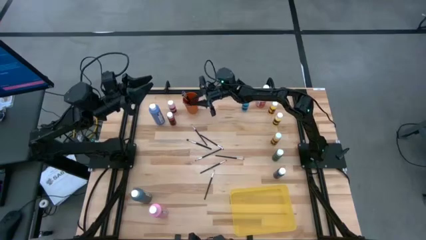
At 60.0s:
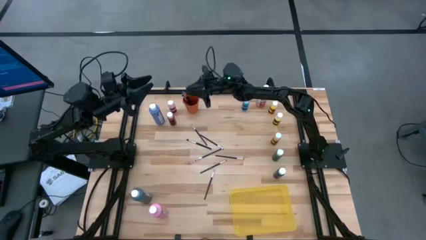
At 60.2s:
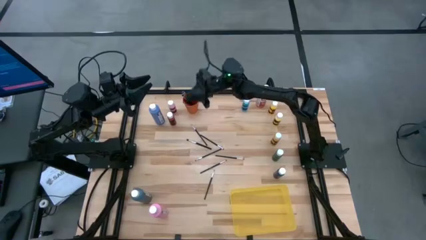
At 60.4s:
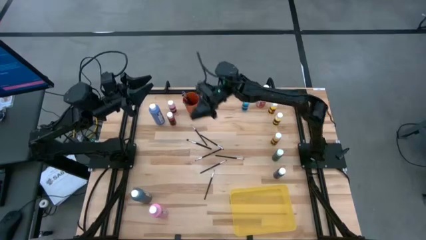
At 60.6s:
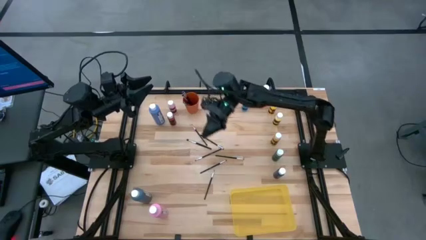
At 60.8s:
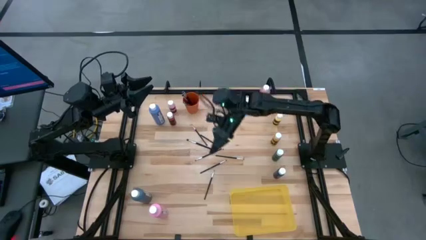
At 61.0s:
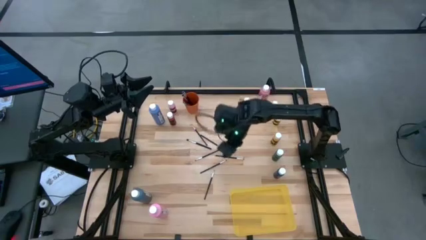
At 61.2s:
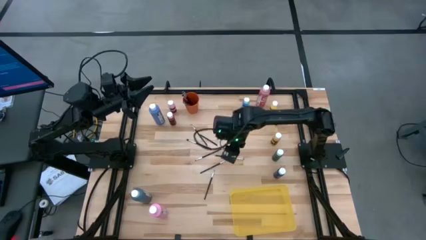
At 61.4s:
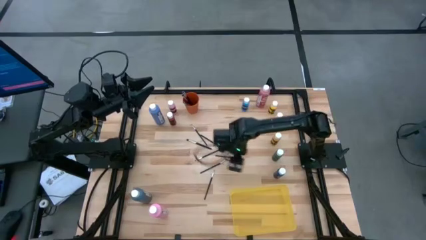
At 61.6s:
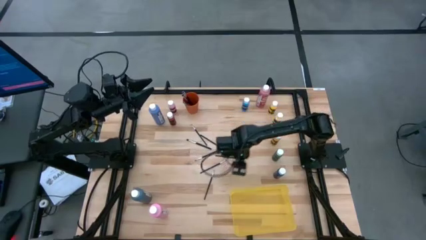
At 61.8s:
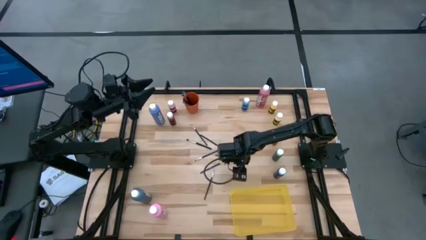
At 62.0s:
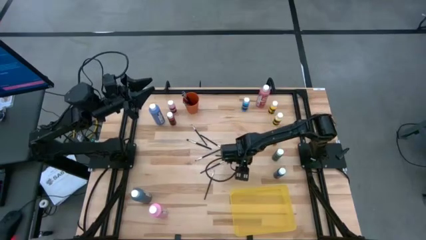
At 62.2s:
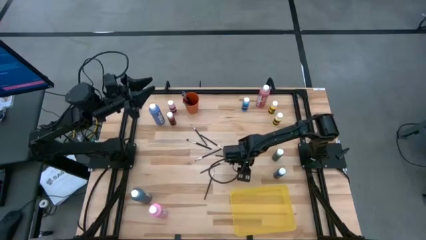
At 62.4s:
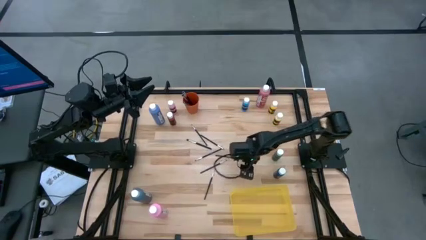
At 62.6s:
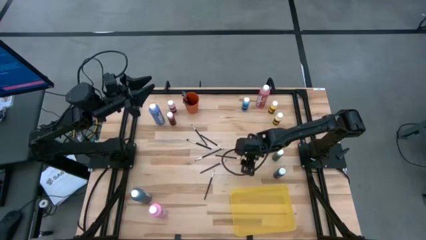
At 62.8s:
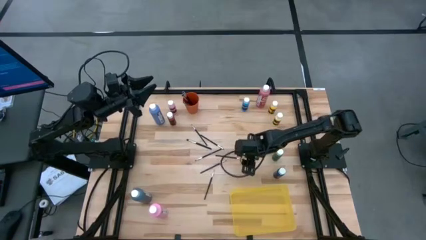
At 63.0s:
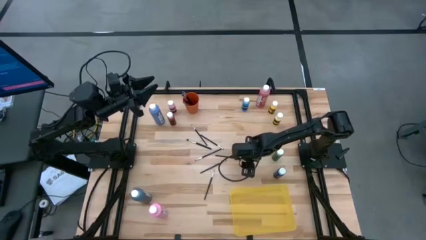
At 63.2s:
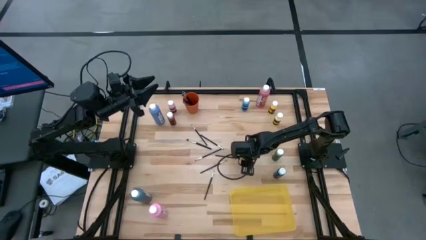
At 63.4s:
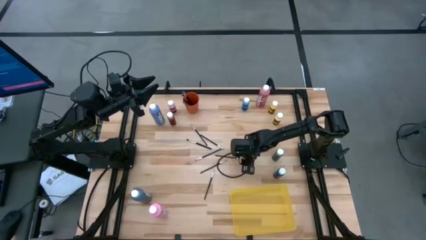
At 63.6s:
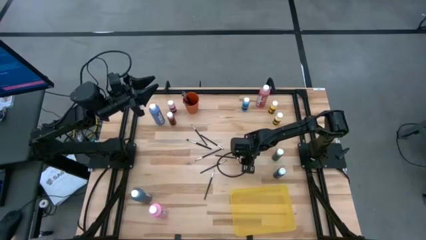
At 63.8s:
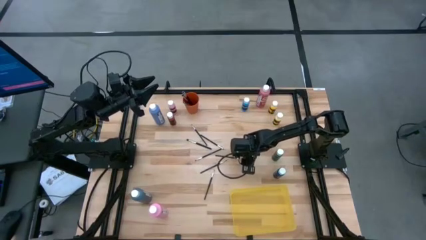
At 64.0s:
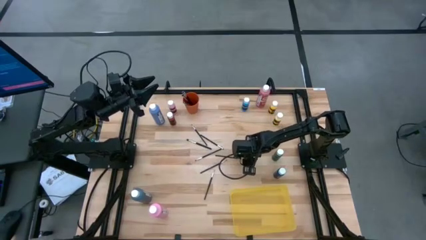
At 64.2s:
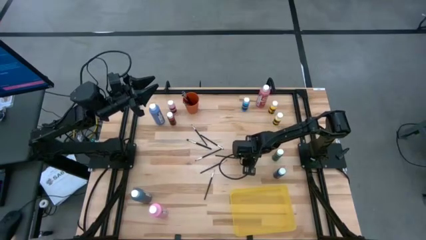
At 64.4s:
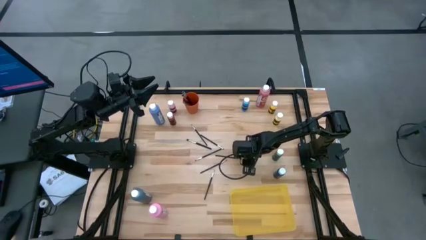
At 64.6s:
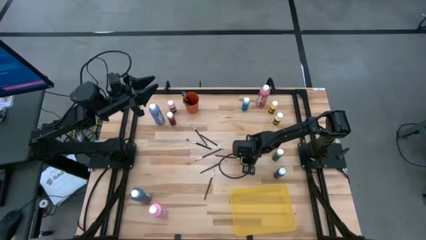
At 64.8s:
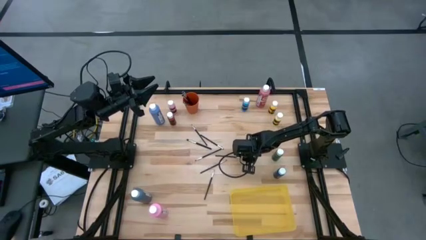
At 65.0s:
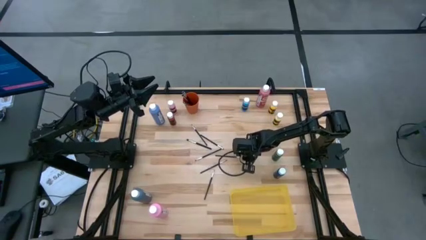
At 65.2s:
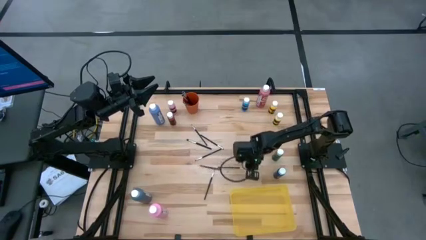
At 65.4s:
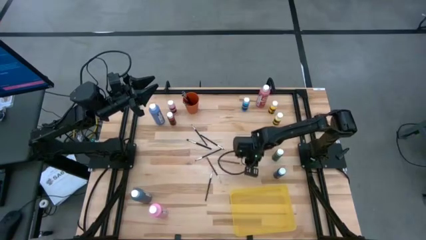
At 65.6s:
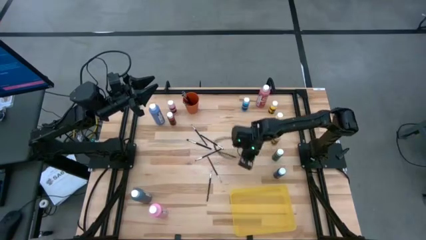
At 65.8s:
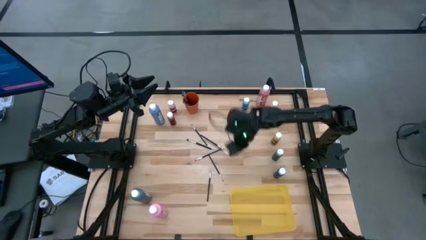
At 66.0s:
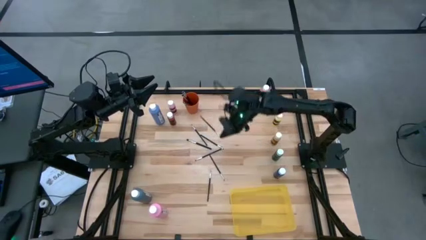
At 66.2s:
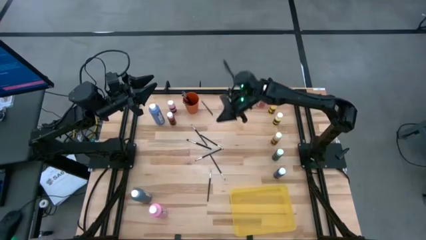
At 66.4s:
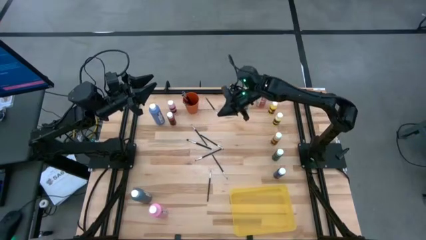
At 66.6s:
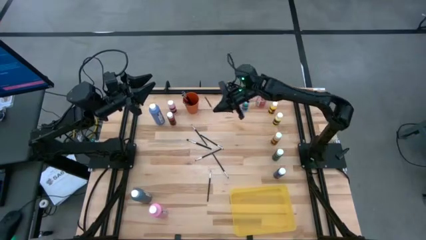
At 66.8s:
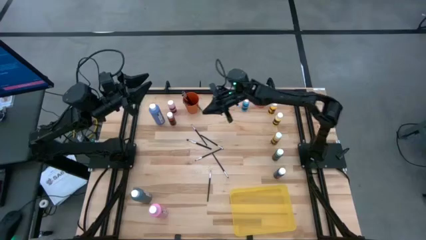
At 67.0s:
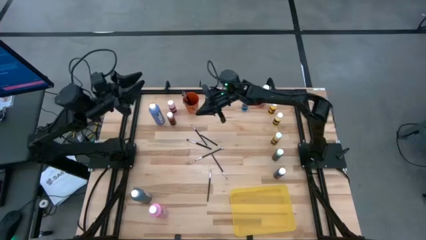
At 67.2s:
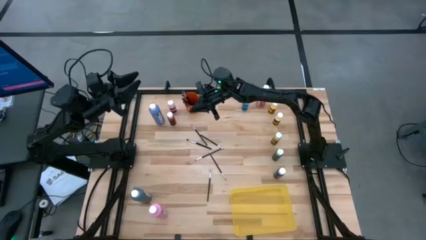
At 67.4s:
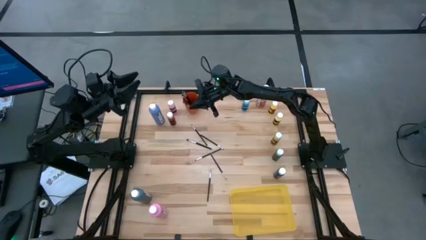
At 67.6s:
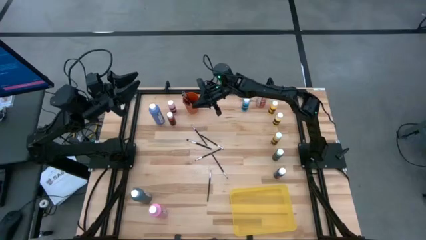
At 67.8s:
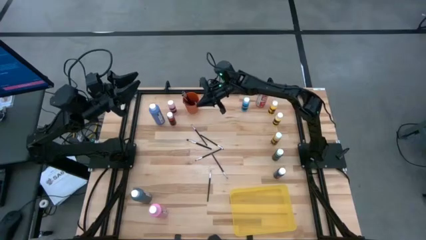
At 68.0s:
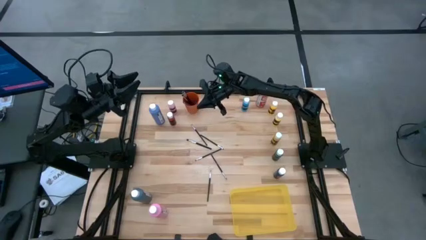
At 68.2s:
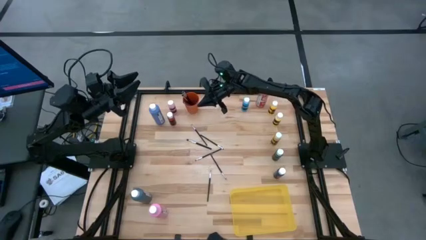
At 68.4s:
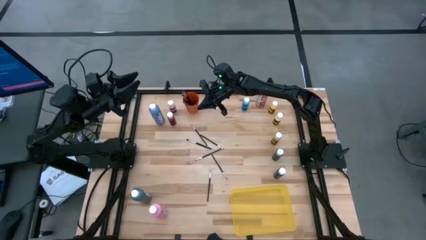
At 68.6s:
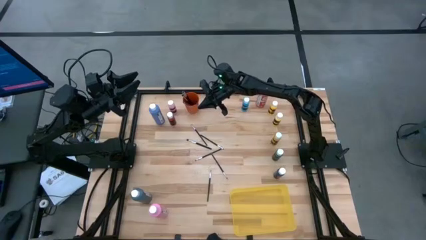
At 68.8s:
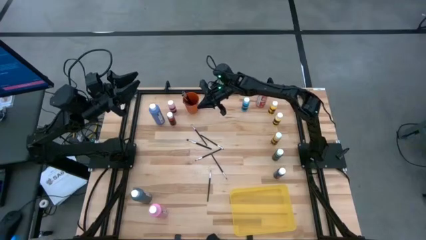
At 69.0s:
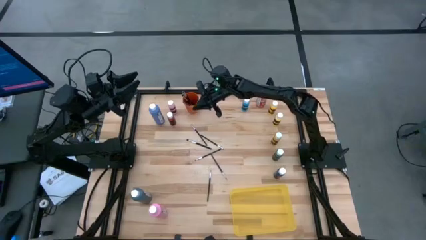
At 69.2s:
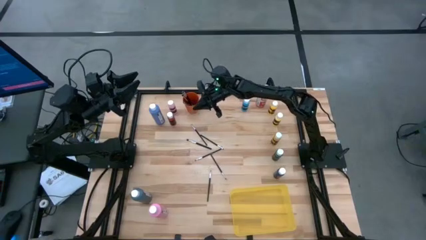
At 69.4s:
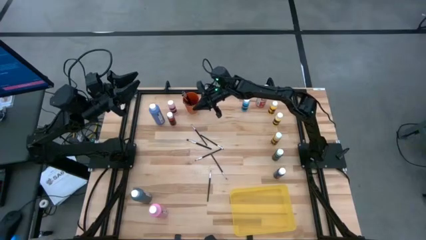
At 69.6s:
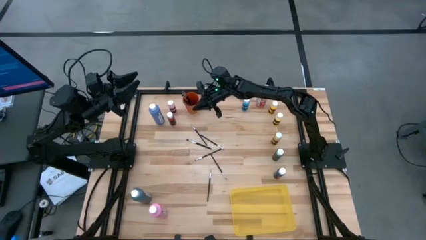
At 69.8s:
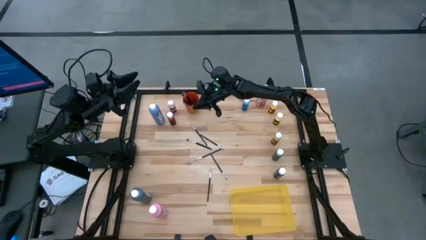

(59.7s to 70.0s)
Task: Pick & Place Paint Supplies
Put the black paint brush into the orange cup

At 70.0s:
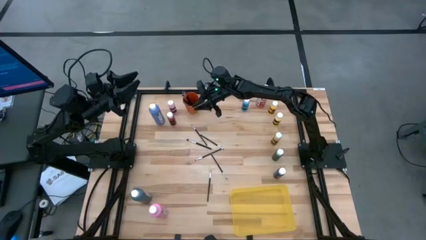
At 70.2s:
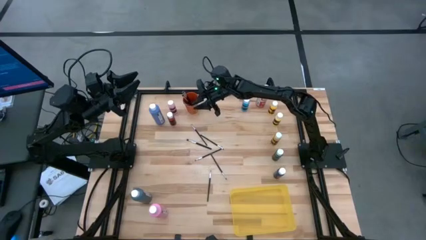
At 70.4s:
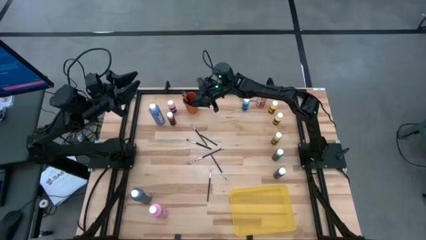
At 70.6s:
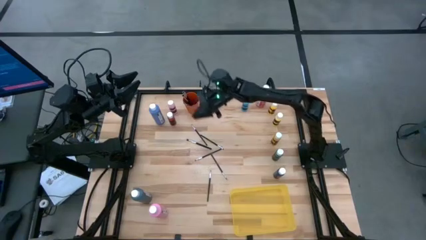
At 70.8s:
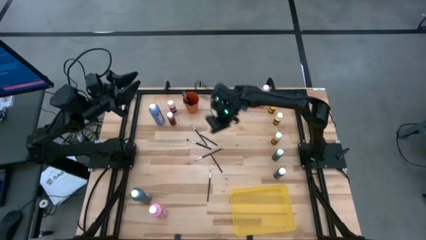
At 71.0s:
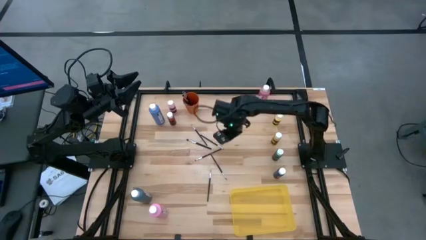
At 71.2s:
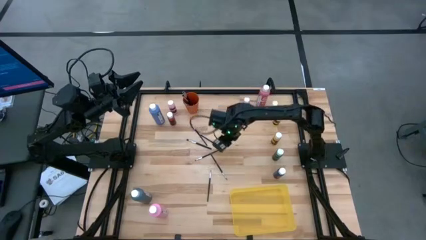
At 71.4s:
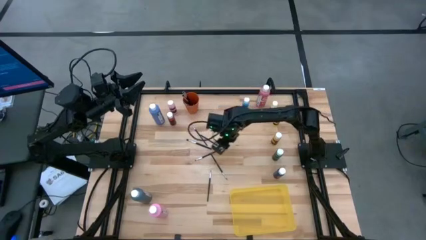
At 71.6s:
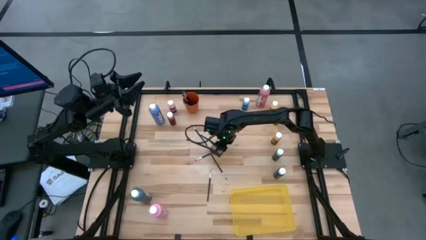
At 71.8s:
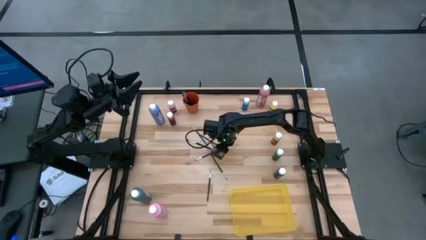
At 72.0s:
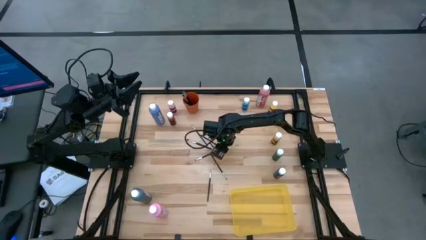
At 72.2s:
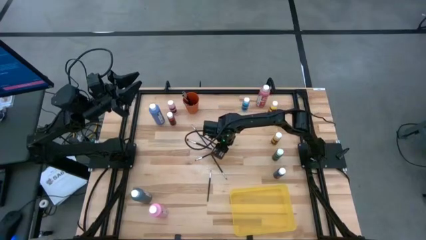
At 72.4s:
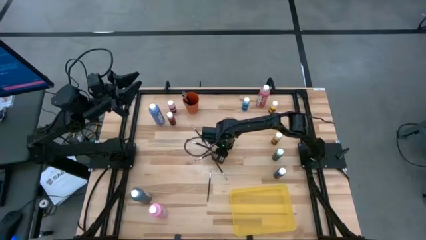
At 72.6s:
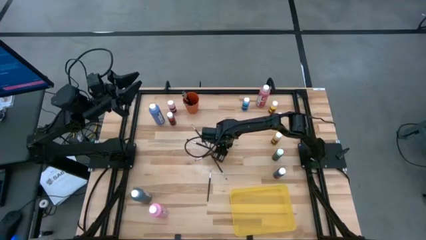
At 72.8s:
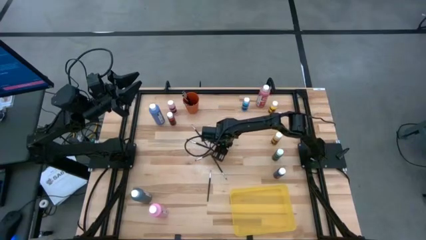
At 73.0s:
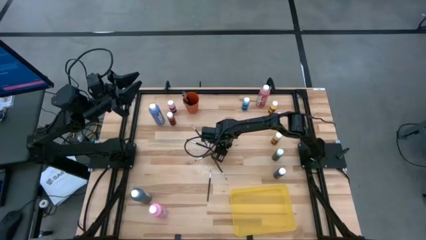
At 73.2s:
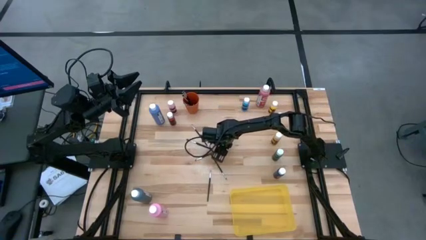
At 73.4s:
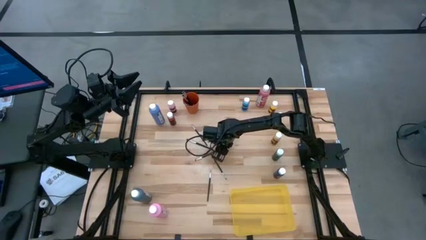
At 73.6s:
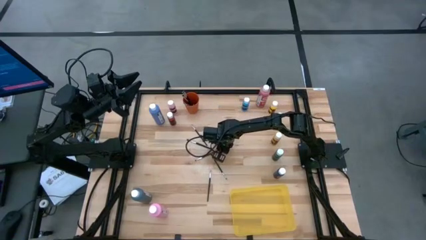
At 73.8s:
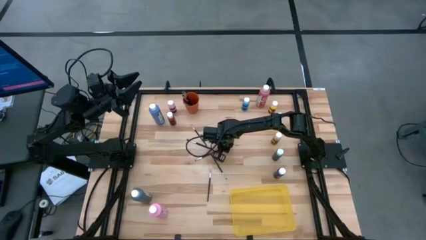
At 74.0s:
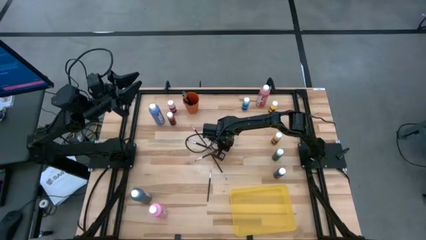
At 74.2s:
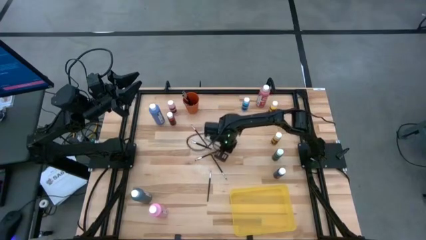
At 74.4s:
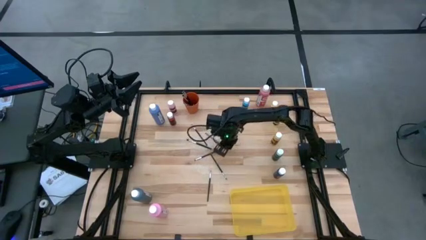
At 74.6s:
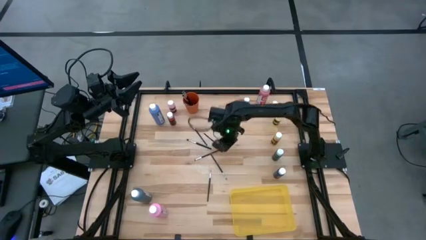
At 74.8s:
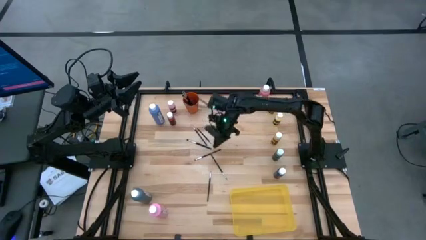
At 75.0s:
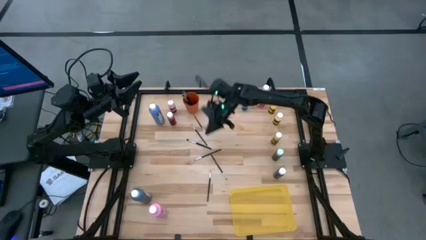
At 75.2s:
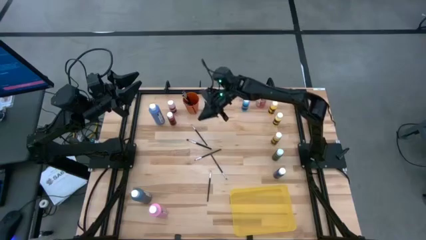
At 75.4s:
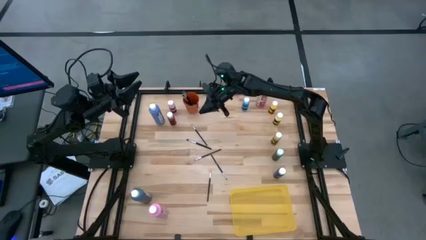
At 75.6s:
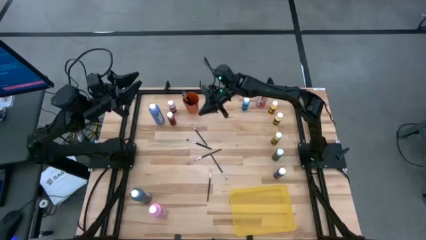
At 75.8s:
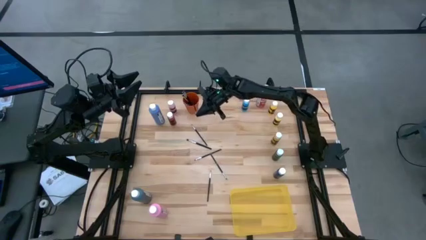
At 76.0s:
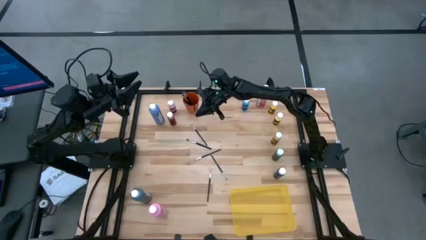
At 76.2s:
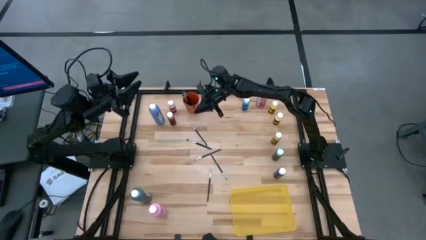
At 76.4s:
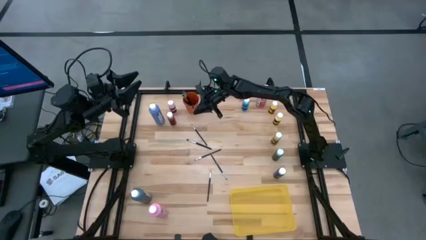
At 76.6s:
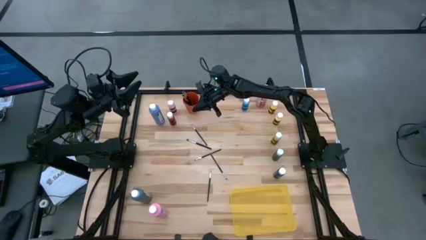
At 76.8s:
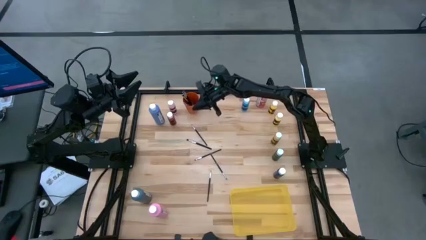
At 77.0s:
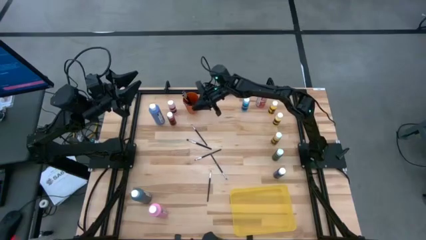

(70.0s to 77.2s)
Put the black paint brush into the orange cup
